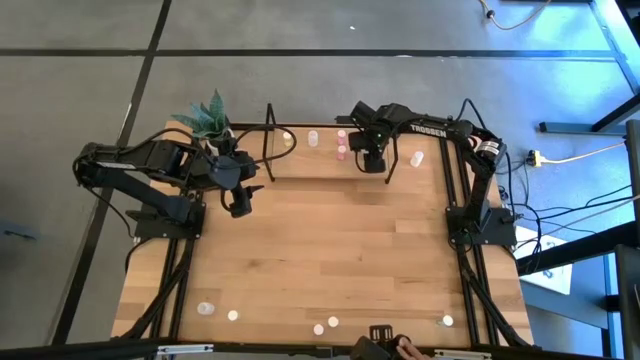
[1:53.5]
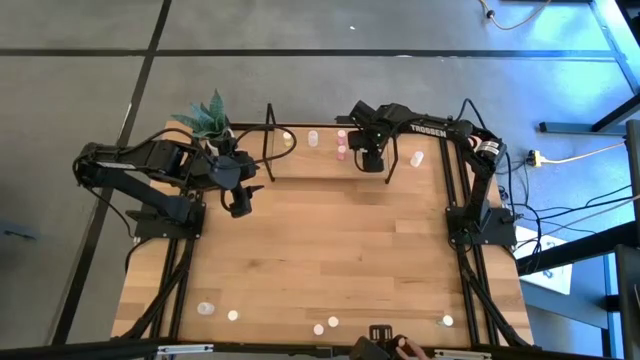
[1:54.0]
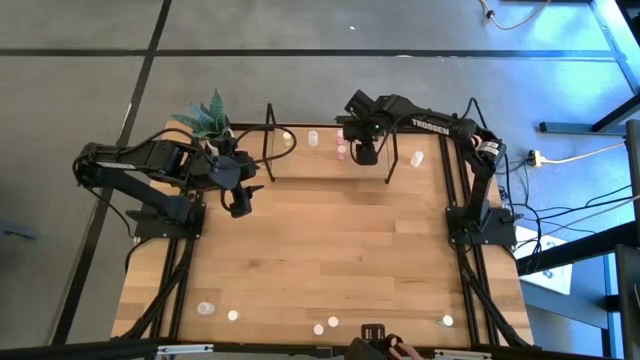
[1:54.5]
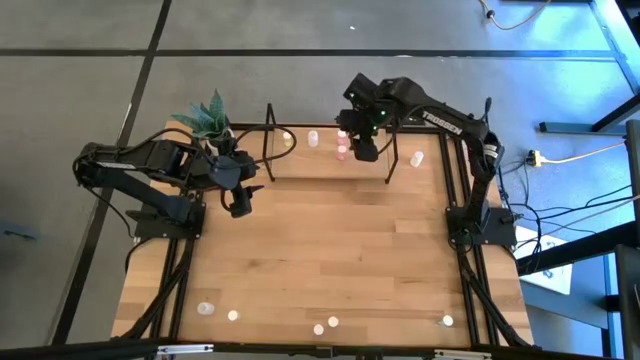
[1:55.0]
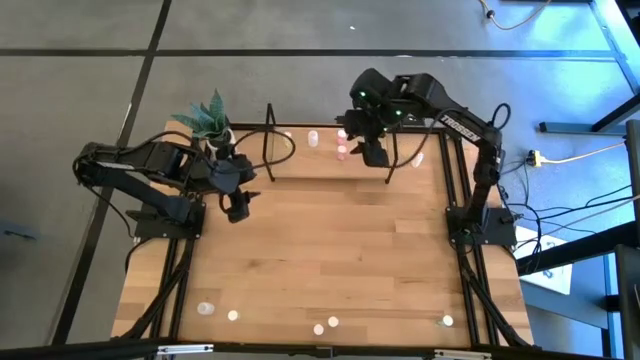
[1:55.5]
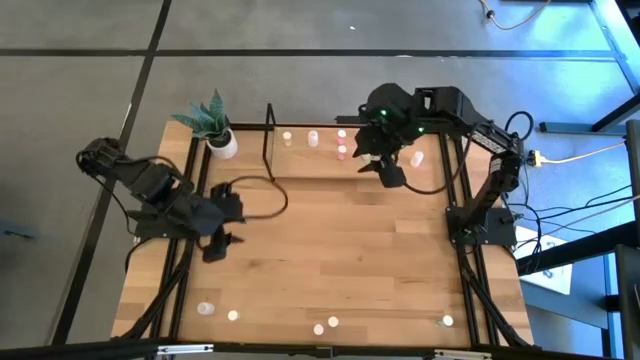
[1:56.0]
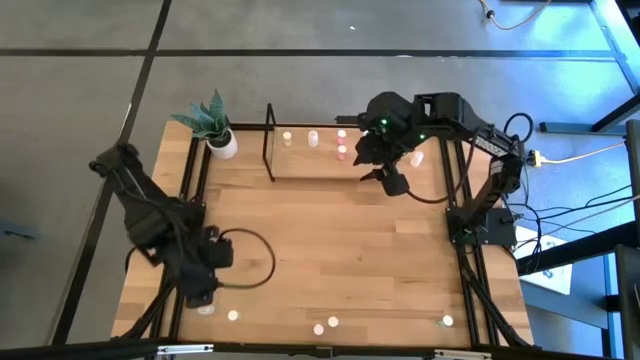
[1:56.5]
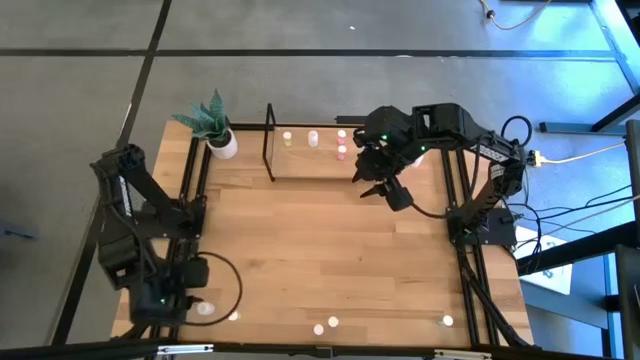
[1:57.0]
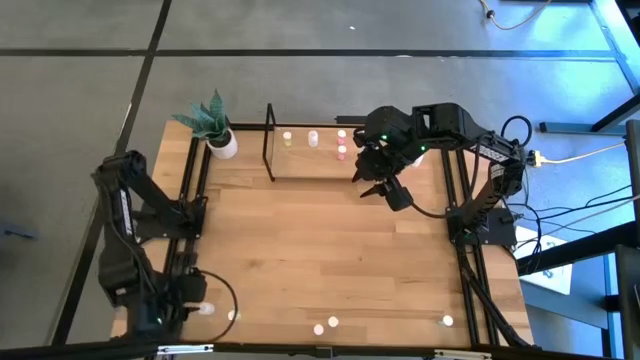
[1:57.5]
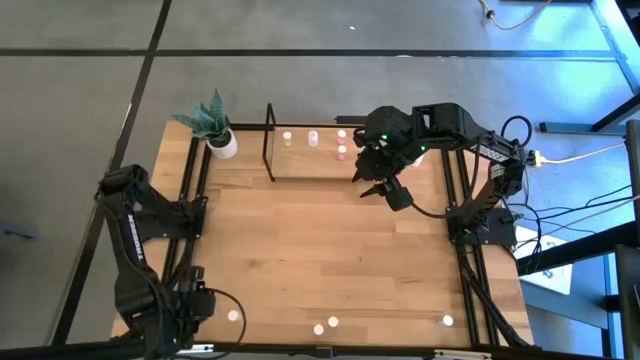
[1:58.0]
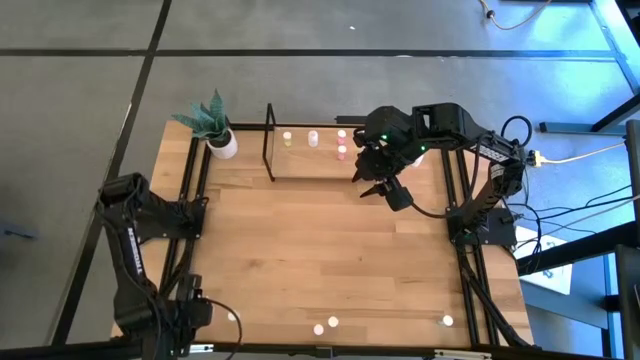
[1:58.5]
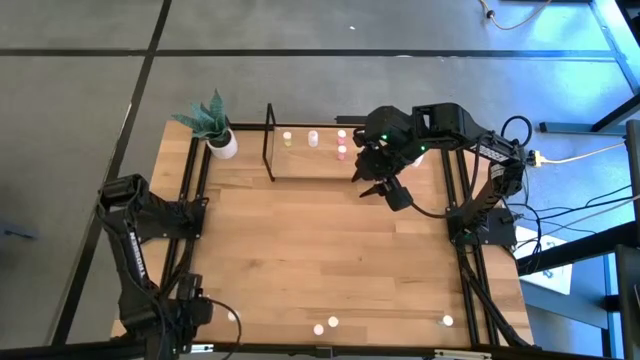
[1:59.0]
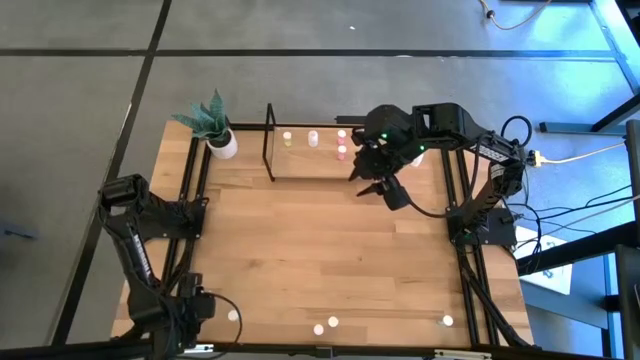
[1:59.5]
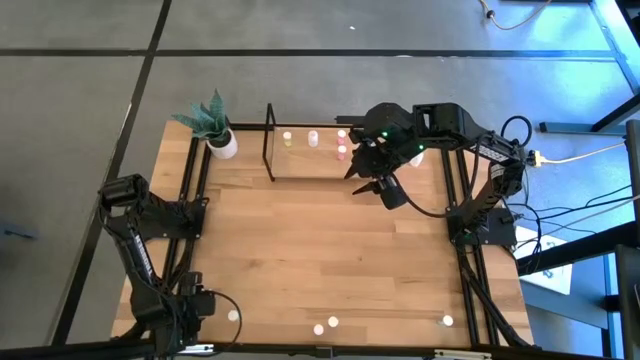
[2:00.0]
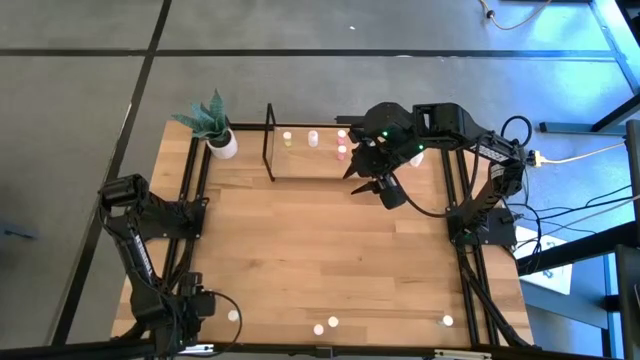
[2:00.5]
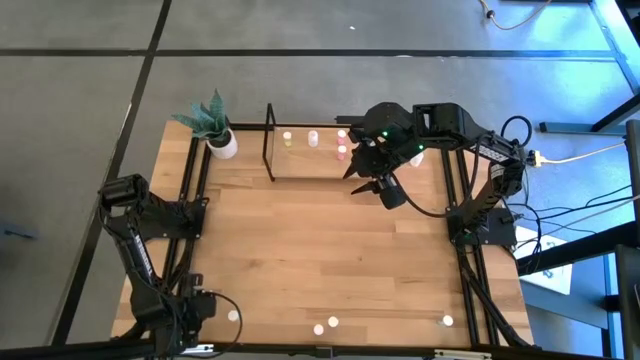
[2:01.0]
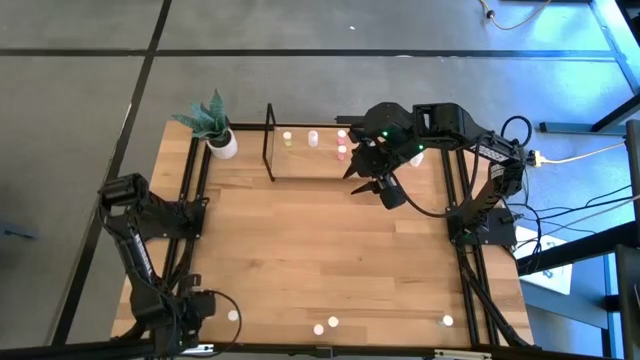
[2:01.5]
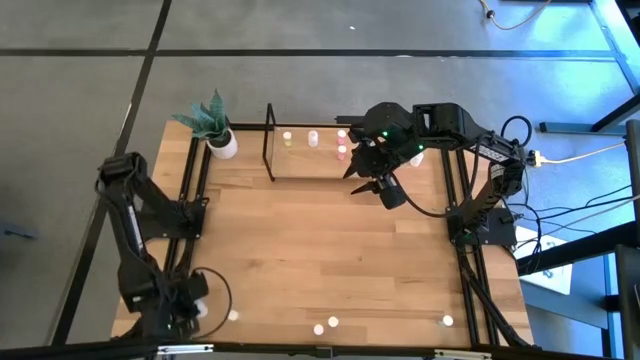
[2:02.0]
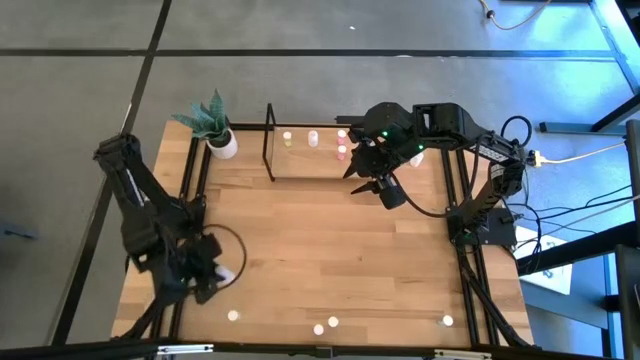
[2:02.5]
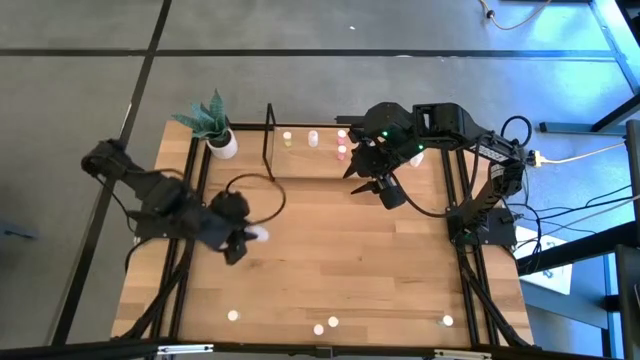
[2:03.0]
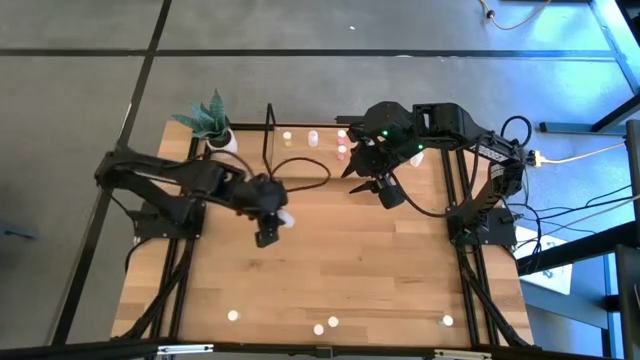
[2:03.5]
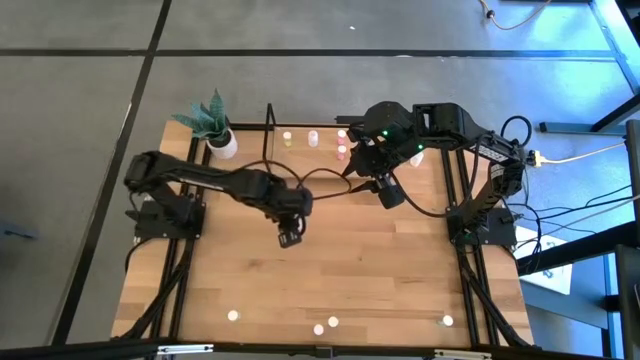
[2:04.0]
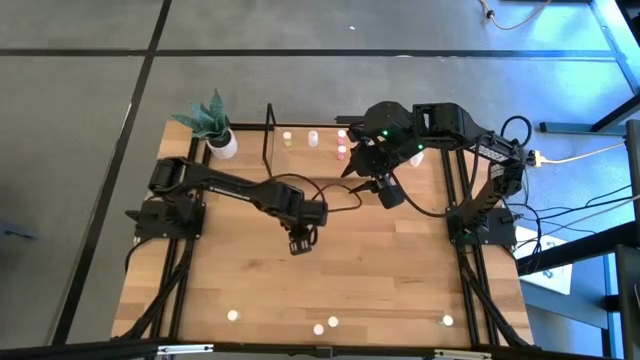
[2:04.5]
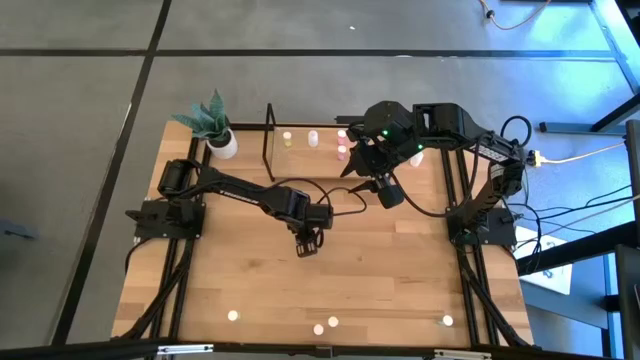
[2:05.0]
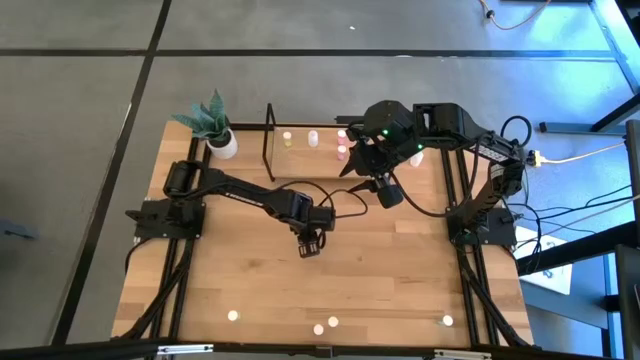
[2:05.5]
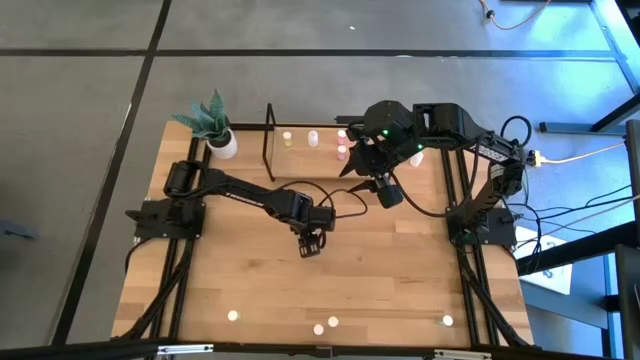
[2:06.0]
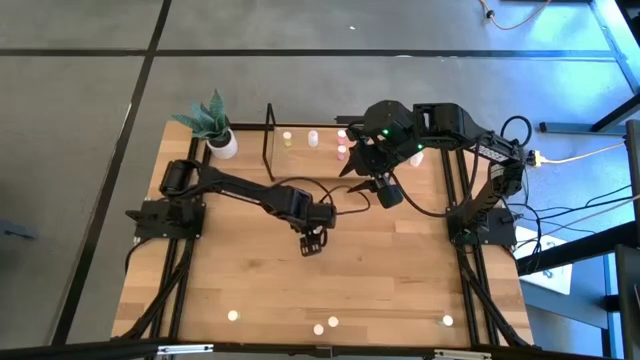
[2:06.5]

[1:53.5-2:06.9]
Task: Pick and place medicine bottles onto shelf by color
Put the bottom white pill bottle on the shelf aligned with other white pill bottle

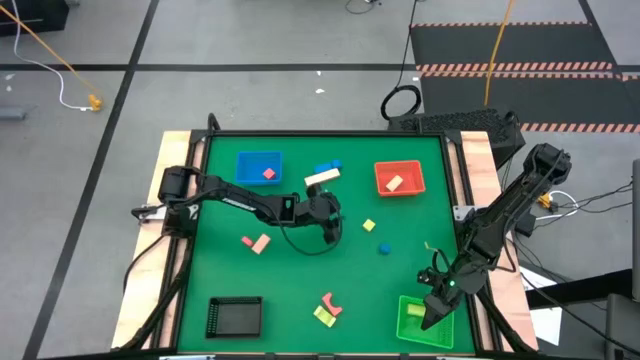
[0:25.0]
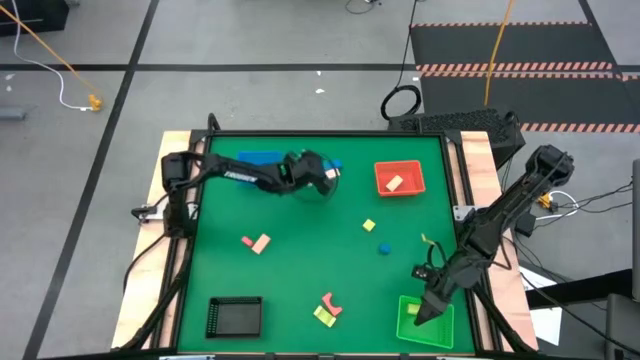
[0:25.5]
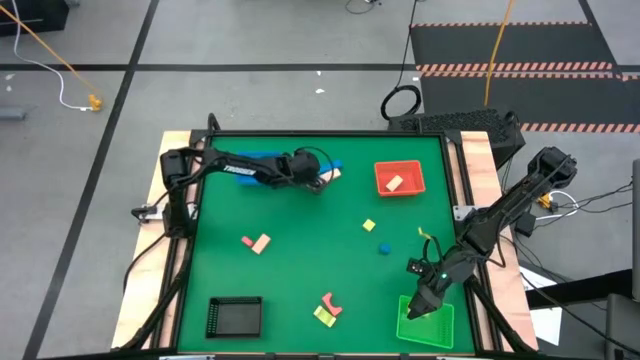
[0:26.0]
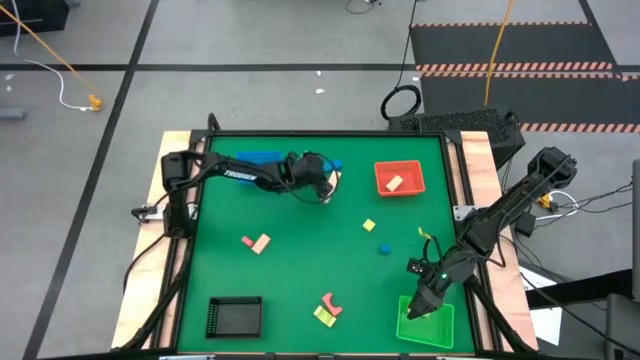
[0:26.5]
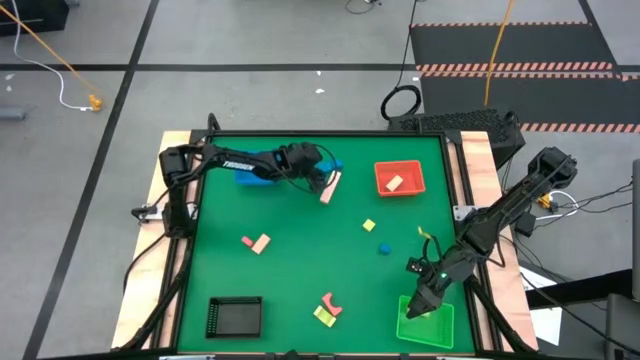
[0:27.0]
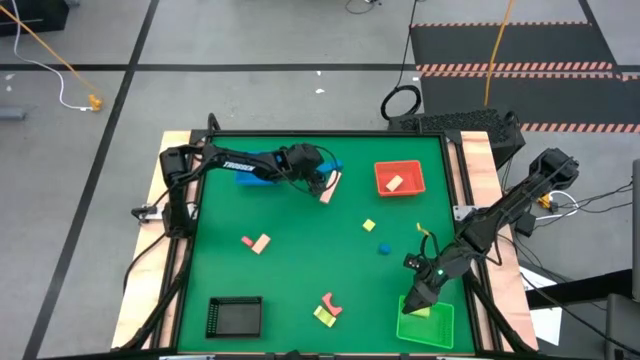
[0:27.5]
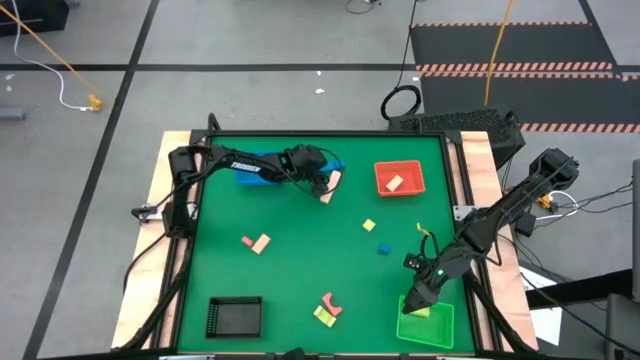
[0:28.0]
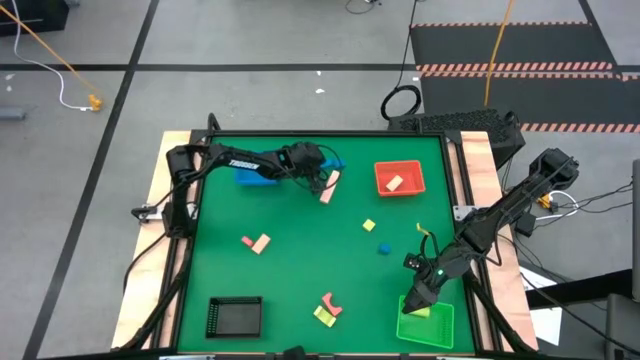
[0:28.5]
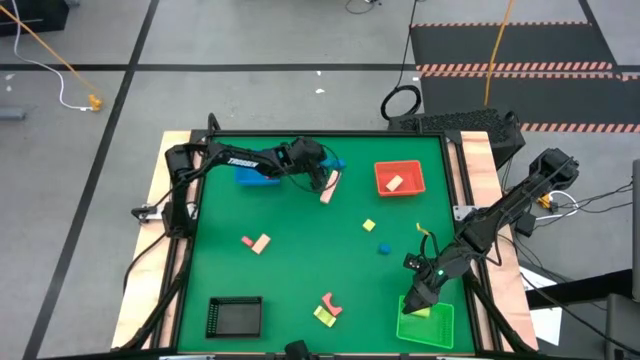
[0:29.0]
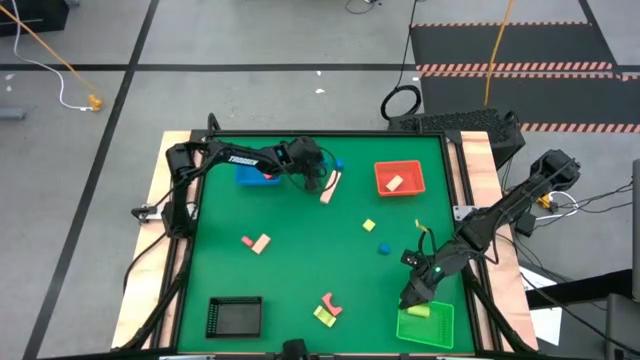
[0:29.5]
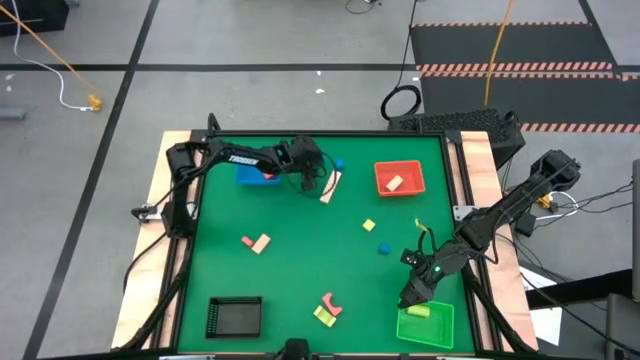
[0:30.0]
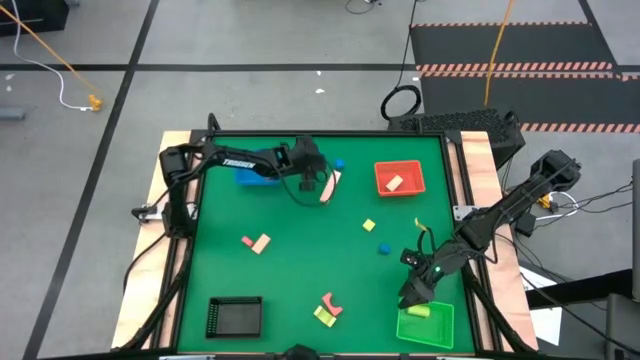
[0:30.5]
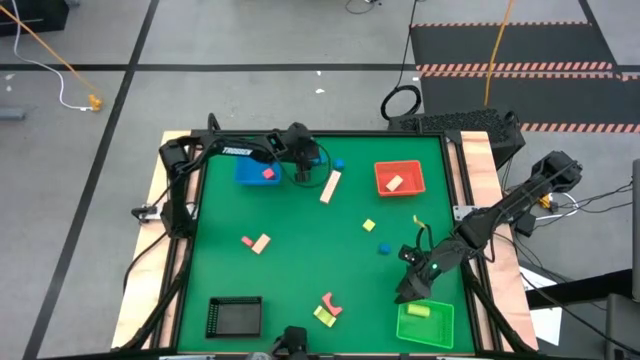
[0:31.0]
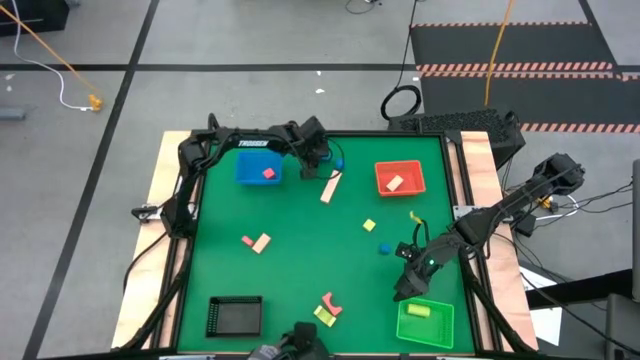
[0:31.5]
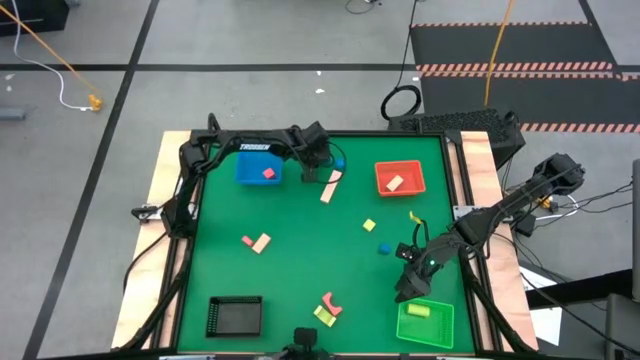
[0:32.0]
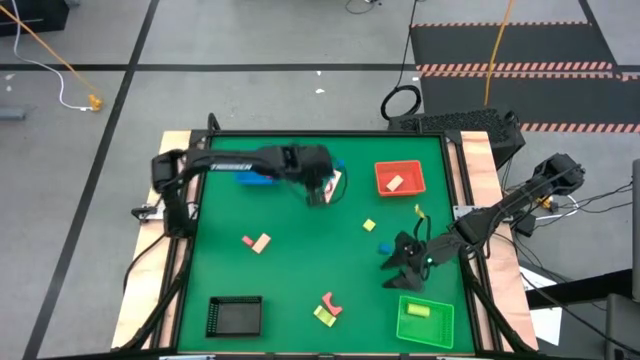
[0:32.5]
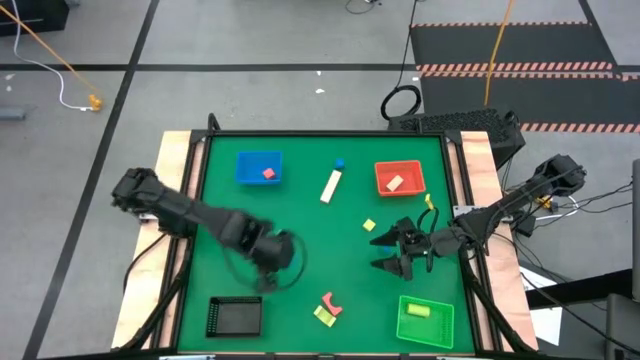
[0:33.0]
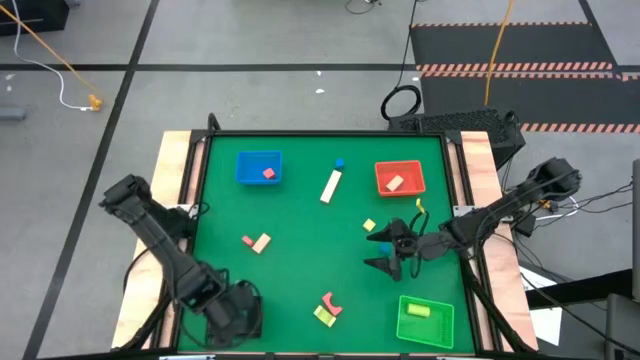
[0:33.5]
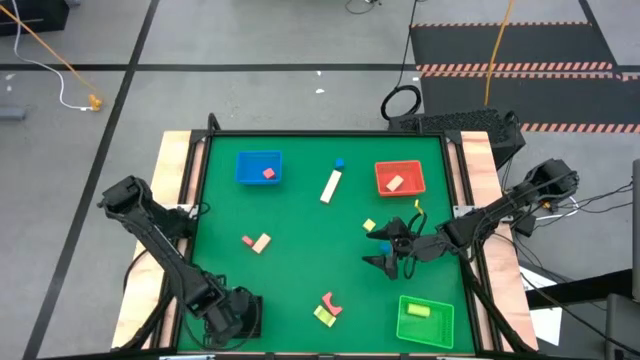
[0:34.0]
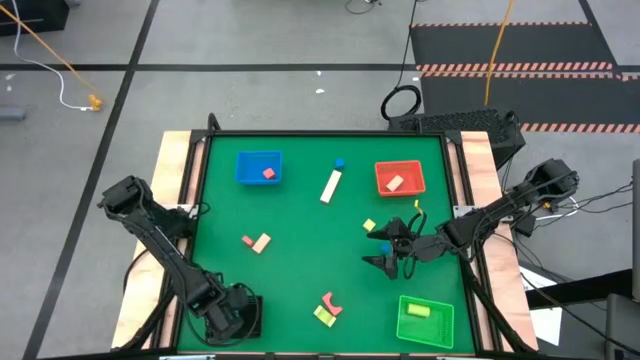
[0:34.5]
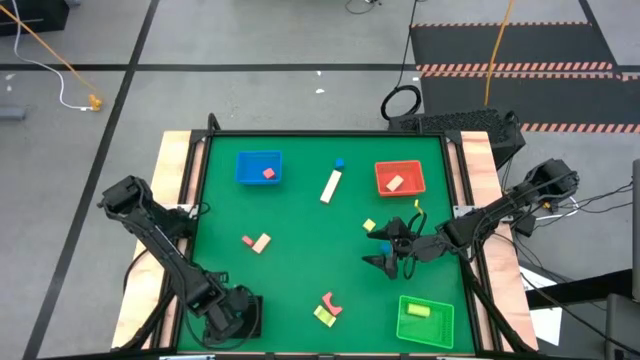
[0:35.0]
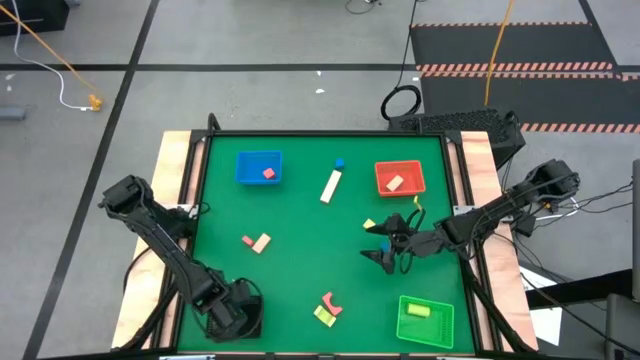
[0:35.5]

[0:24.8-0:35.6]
Task: Sort & place blocks by color
Put the top left blue block in the black basket
